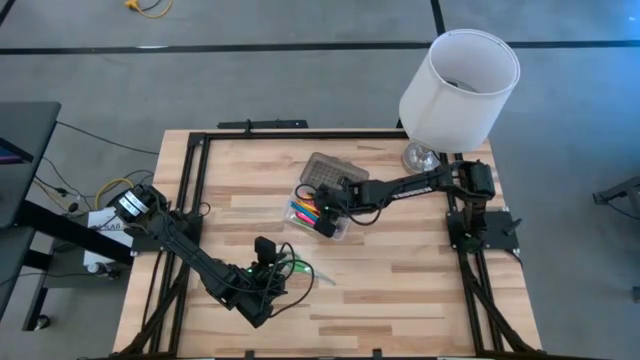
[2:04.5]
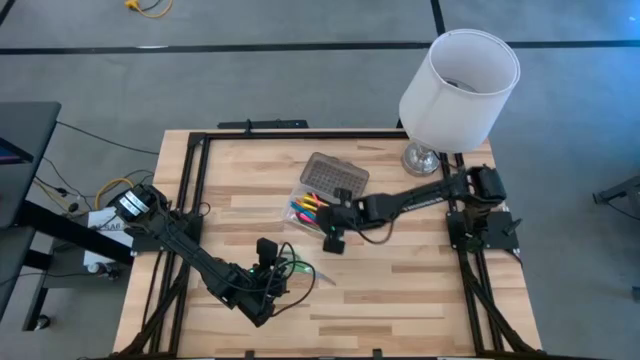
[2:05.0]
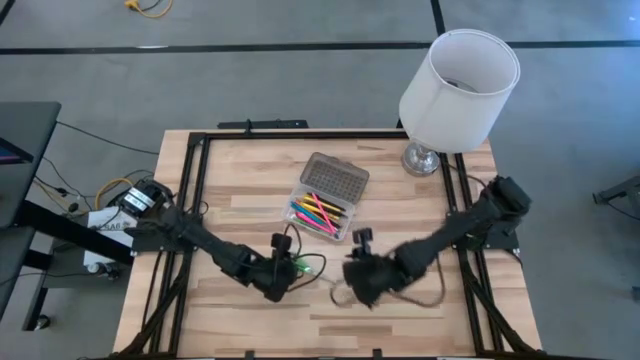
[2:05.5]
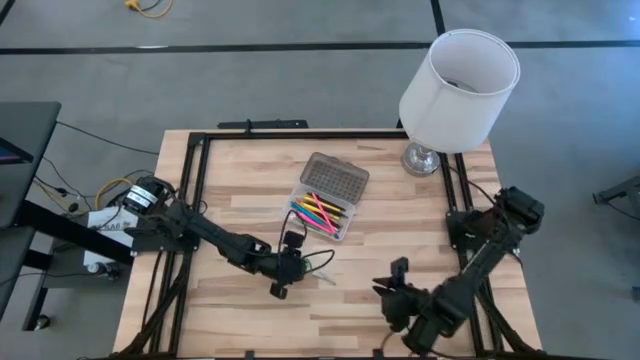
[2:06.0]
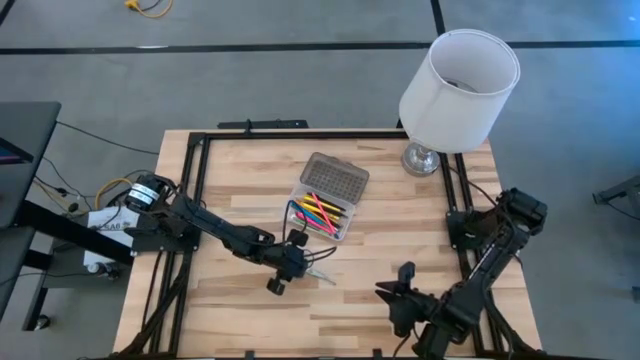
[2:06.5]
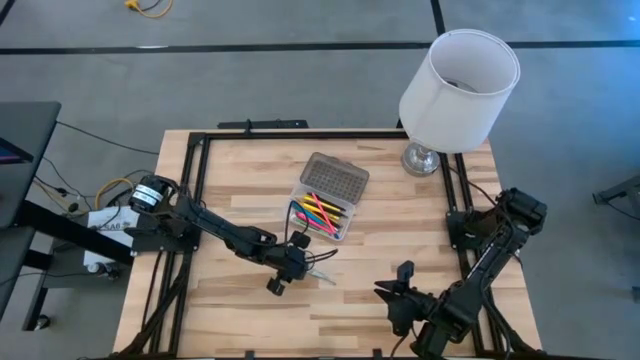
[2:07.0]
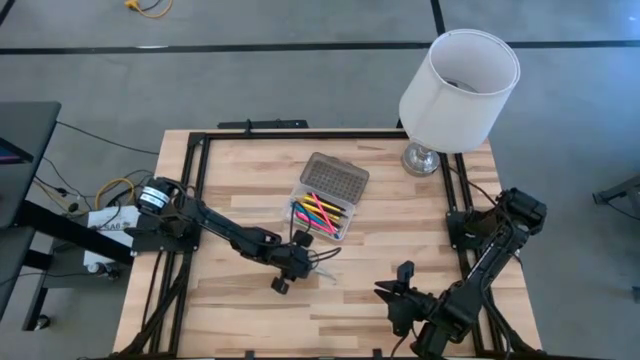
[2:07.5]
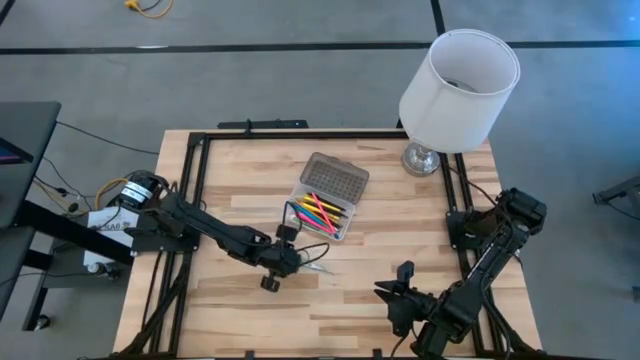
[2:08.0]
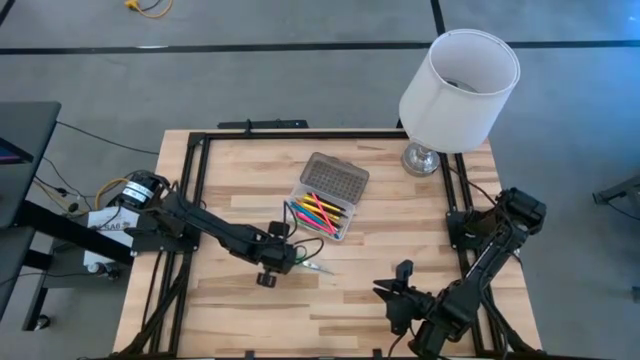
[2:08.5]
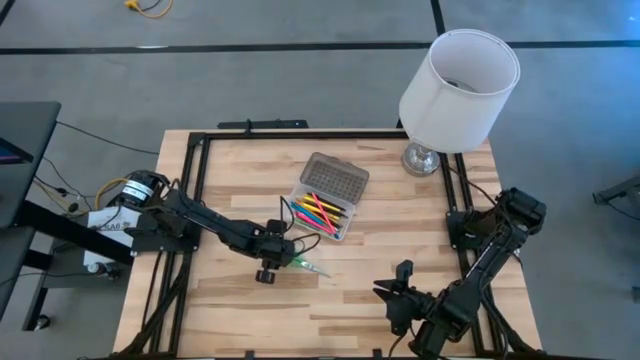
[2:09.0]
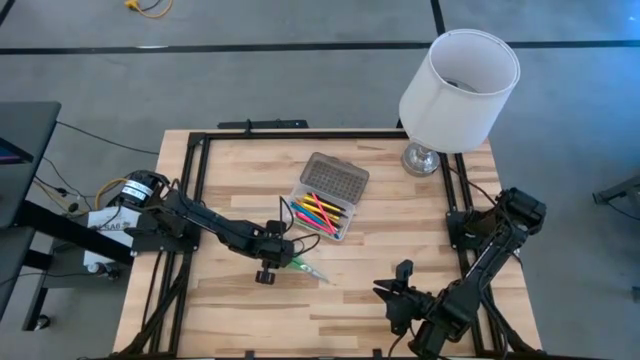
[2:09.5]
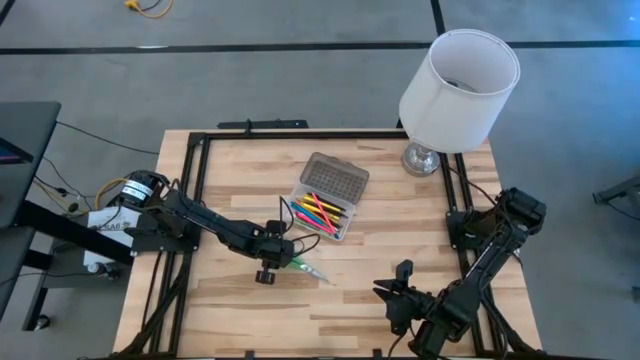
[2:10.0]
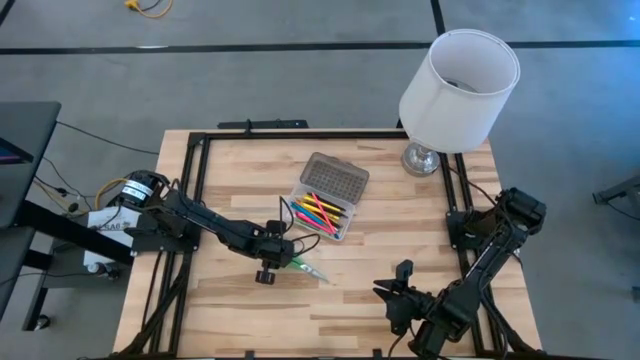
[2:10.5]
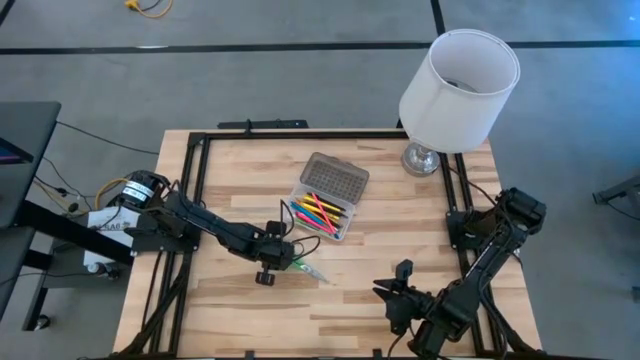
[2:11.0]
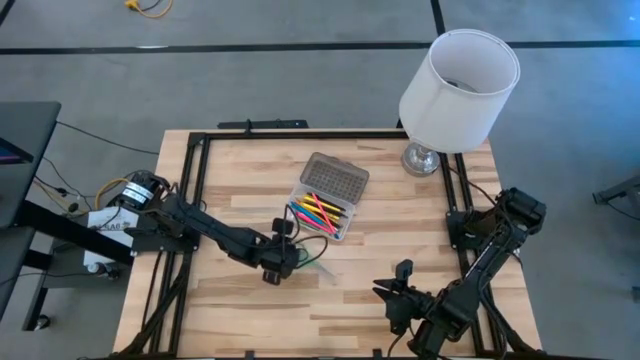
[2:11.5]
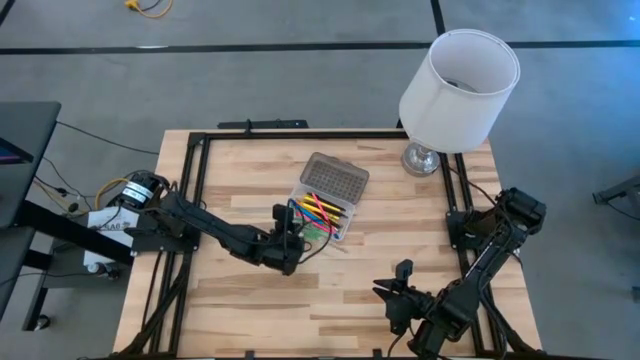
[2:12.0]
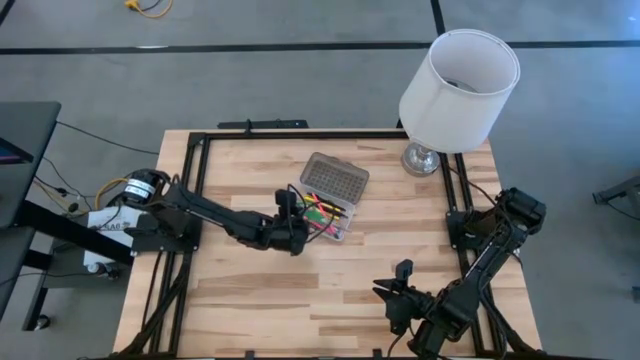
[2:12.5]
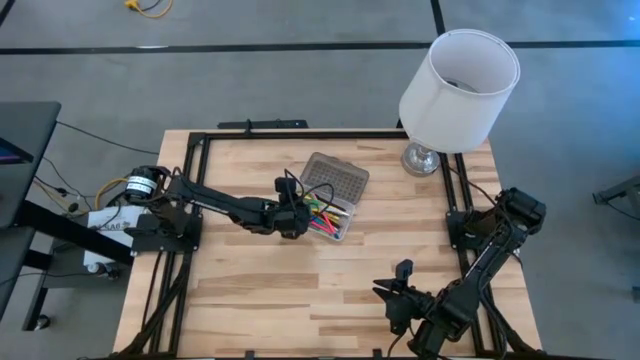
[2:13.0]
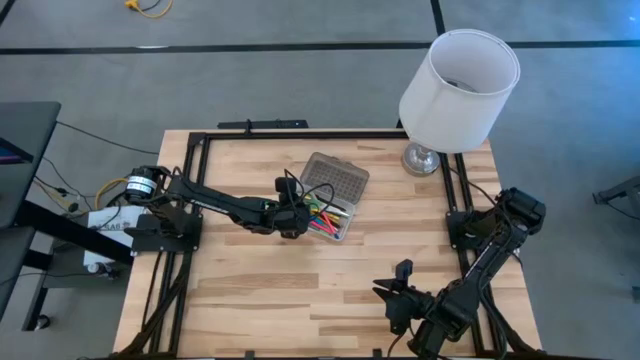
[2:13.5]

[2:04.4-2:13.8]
Task: Pick & place school supplies into a supply box
Put the green scissors into the gray supply box

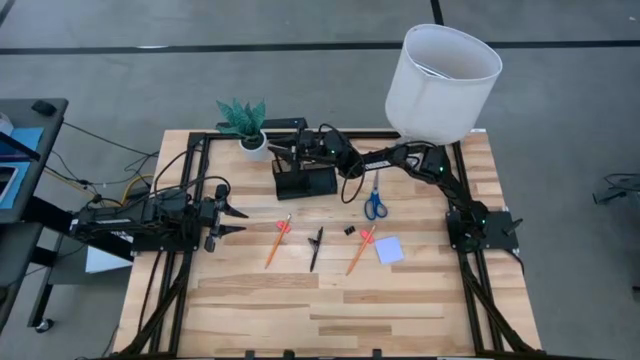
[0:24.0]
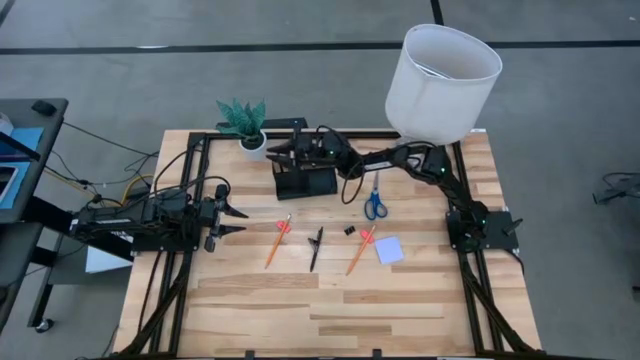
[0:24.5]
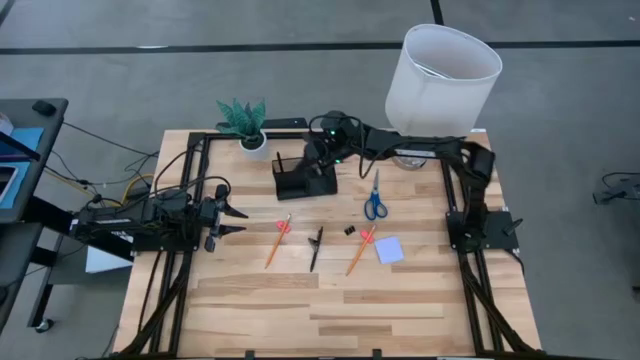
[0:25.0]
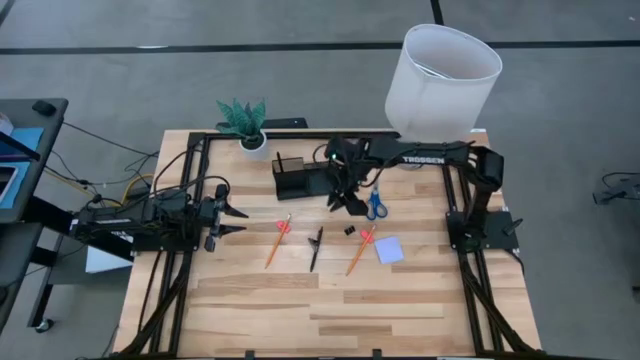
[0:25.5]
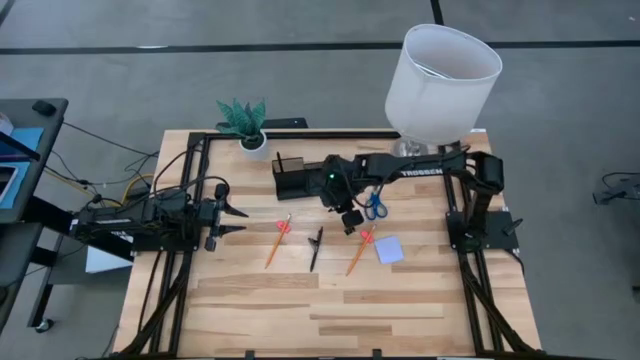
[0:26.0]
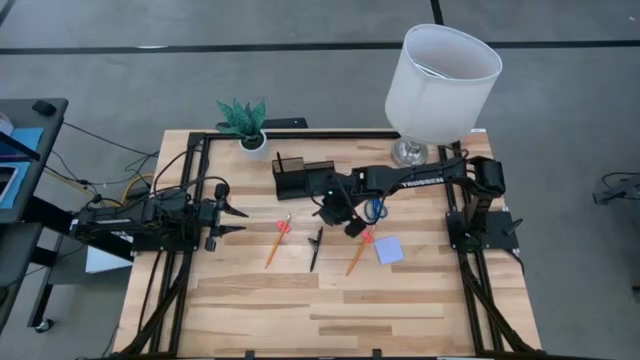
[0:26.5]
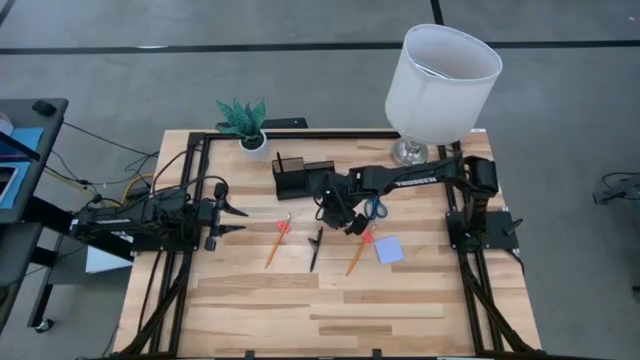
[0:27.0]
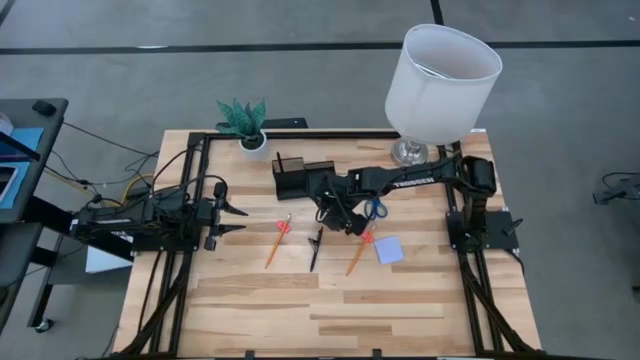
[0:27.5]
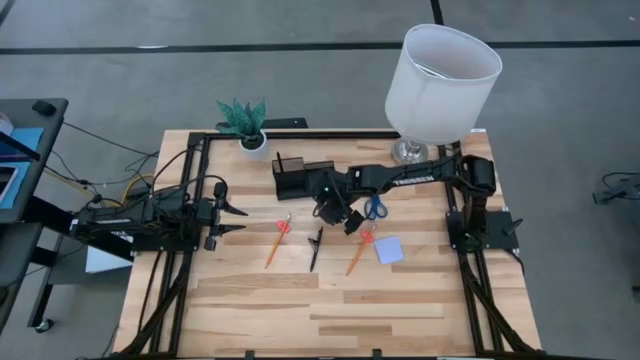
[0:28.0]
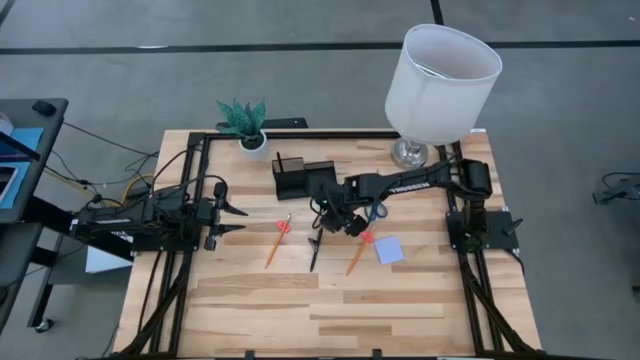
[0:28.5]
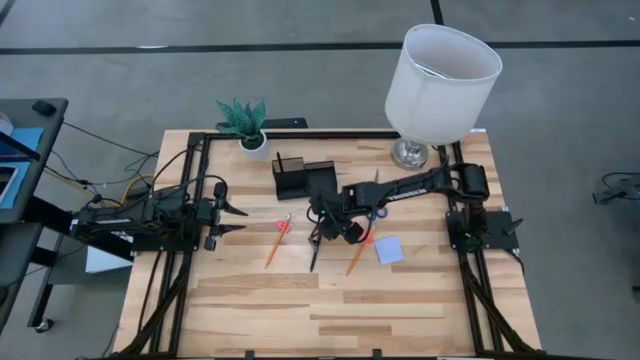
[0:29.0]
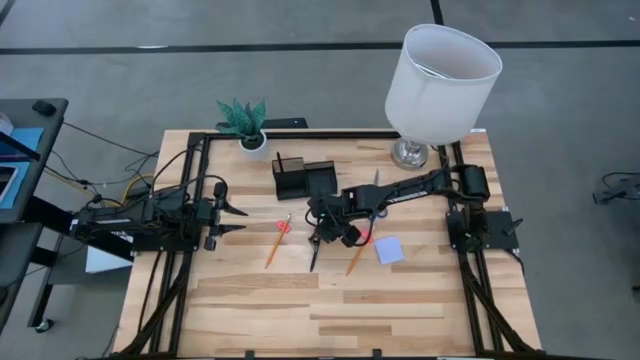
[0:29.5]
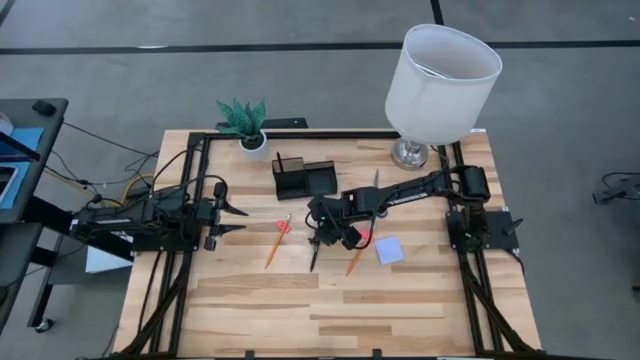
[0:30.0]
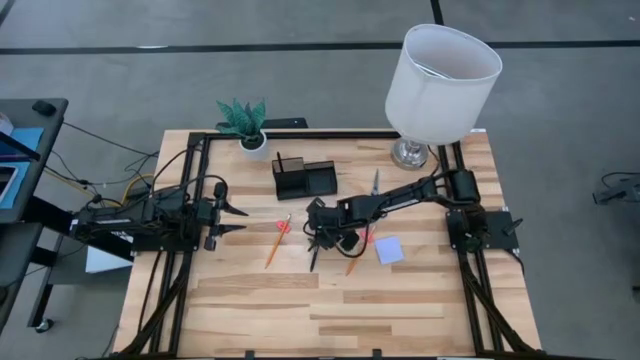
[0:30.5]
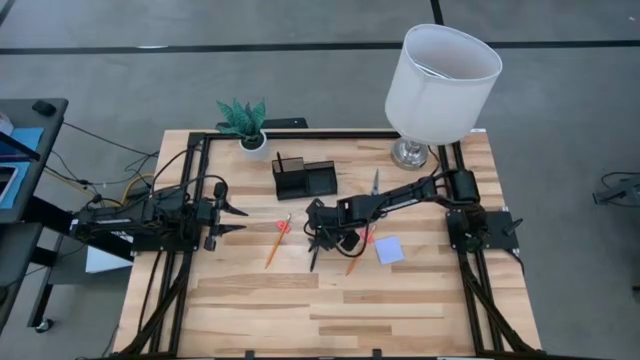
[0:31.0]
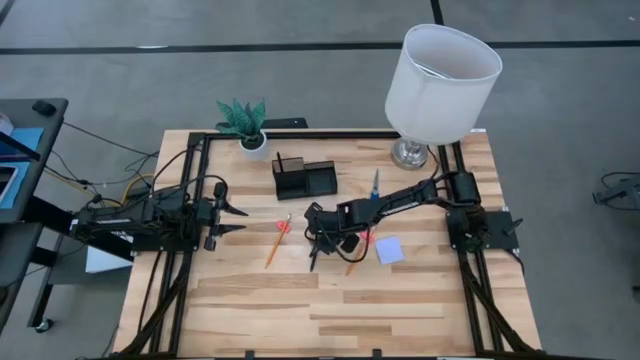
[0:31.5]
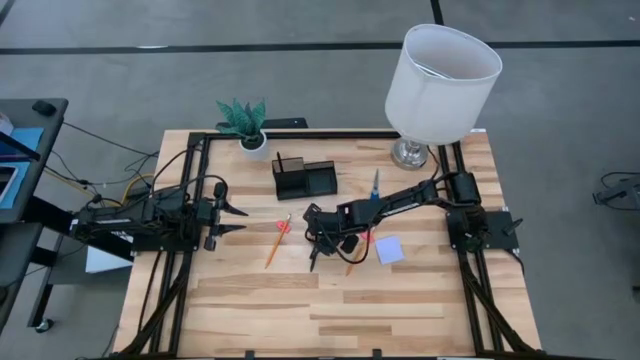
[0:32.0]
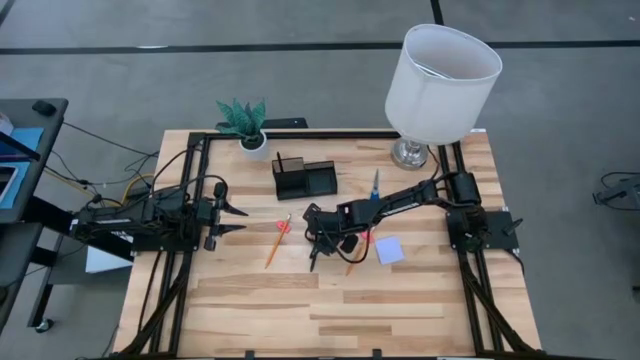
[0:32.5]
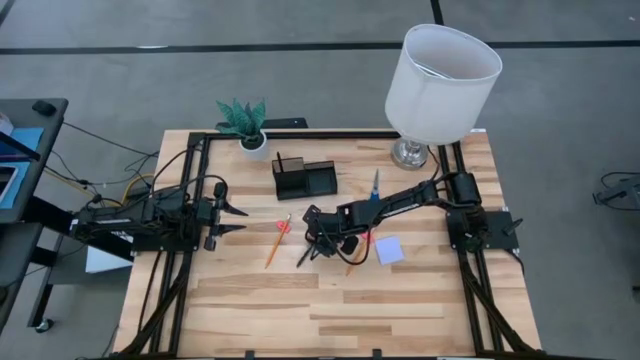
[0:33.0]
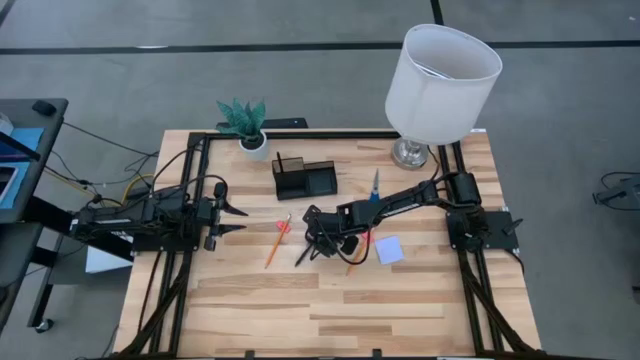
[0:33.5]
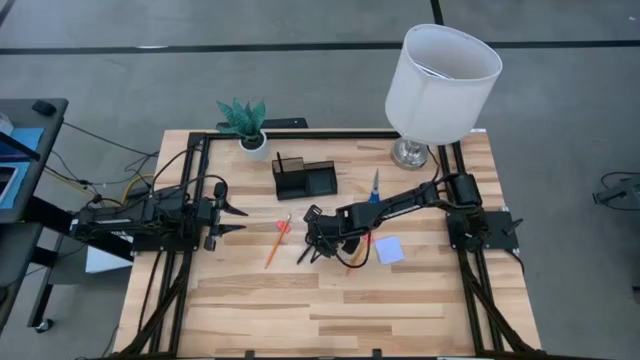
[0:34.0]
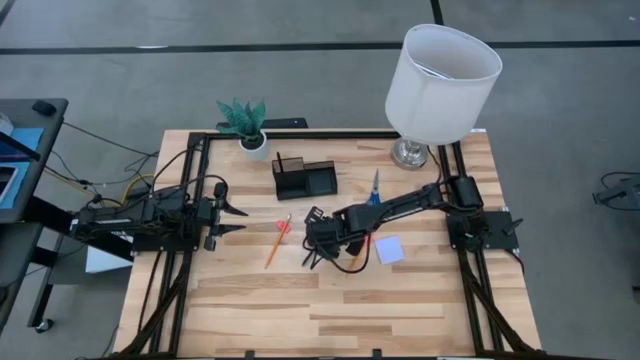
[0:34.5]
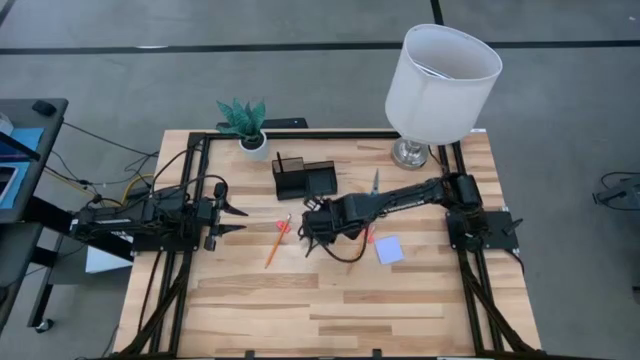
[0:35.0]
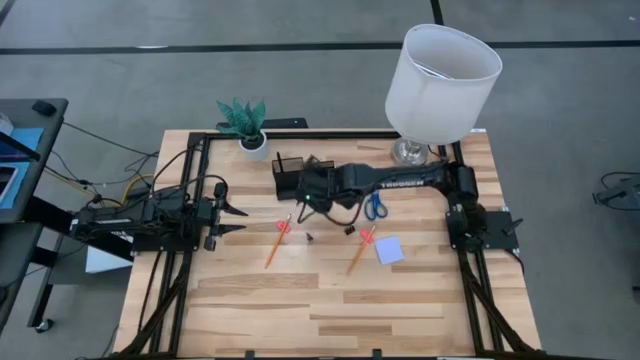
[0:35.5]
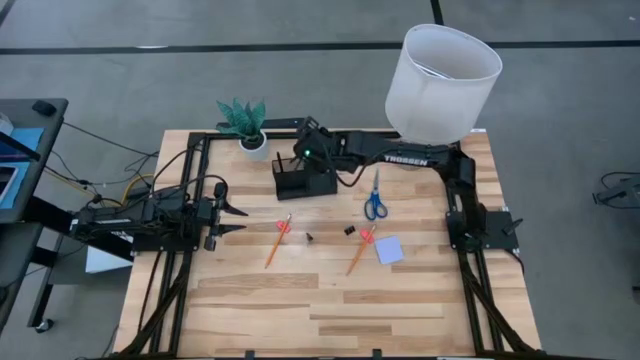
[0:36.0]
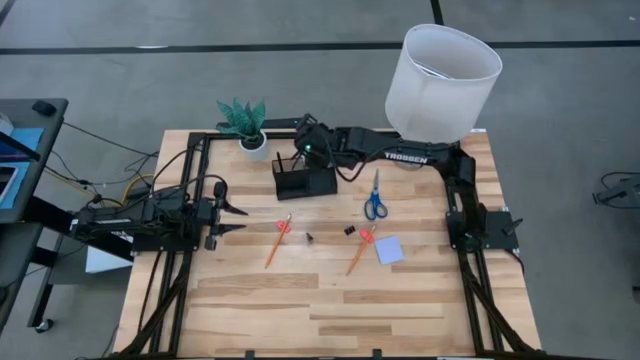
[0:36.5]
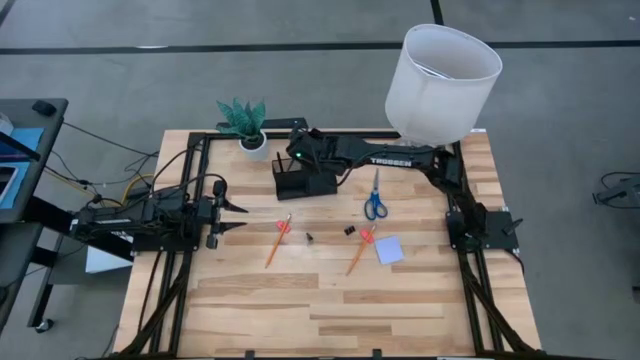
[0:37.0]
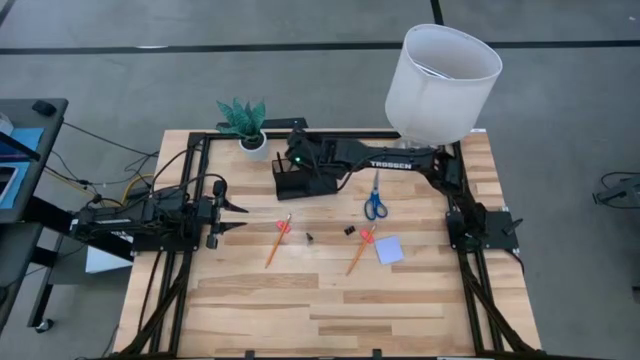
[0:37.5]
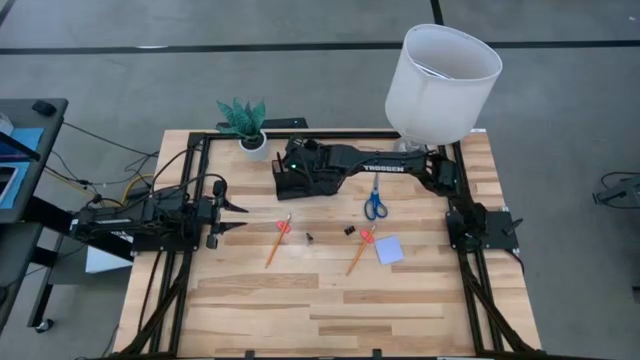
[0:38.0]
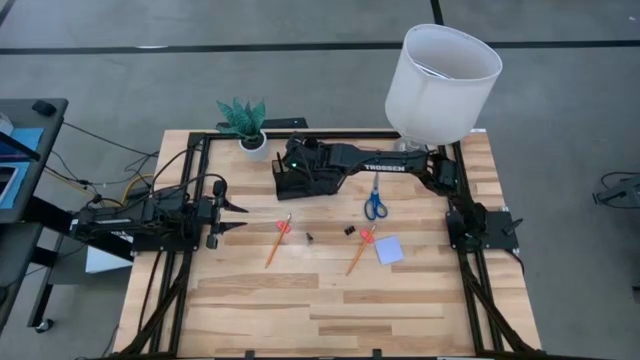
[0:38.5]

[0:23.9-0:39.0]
Task: Pick and place office supplies into organizer
Put the black pen into the black desk organizer
